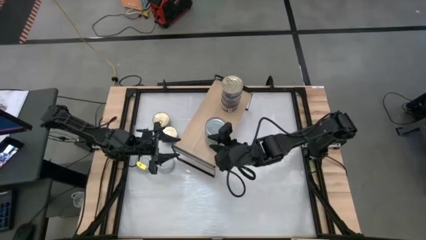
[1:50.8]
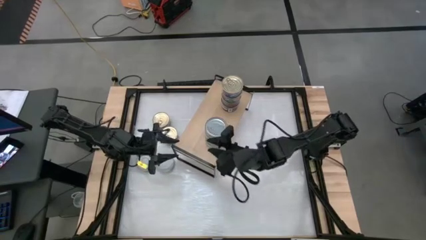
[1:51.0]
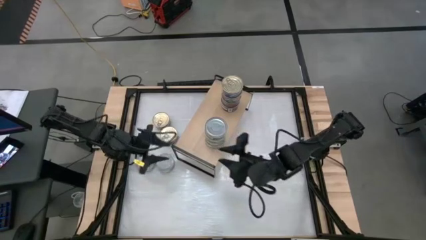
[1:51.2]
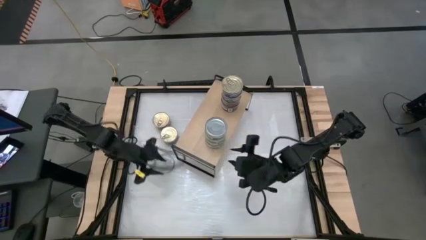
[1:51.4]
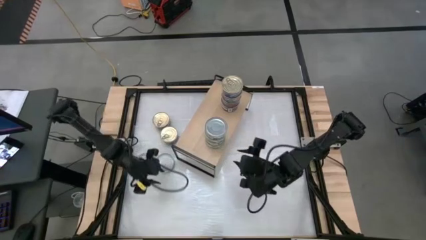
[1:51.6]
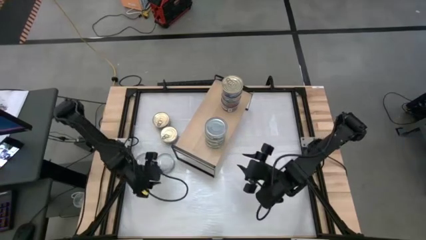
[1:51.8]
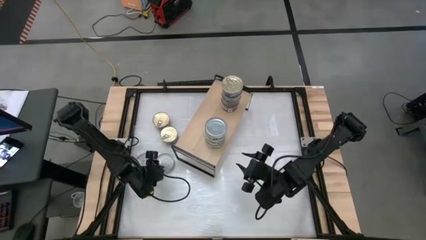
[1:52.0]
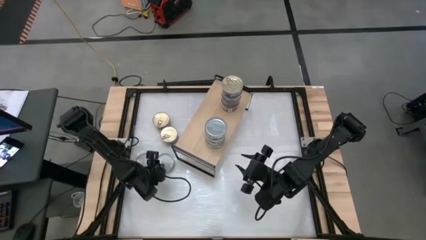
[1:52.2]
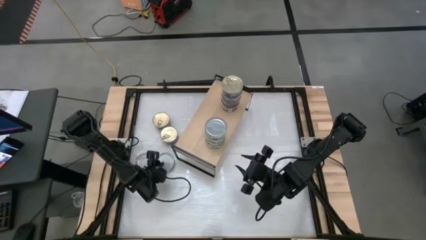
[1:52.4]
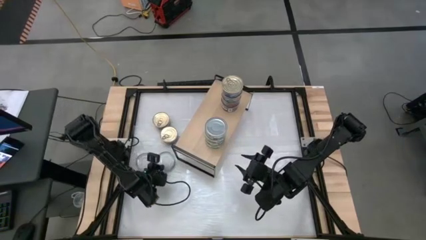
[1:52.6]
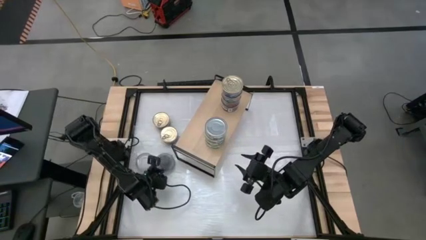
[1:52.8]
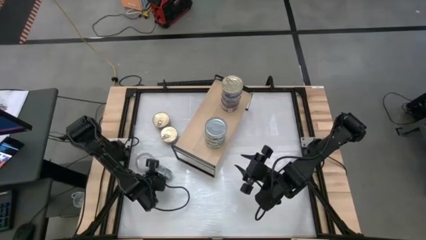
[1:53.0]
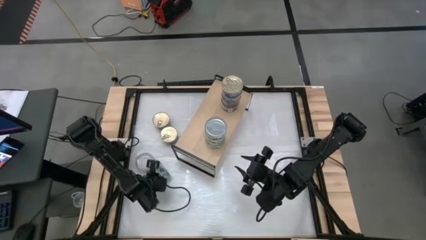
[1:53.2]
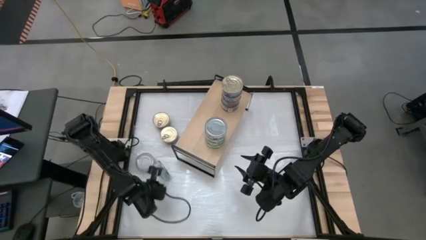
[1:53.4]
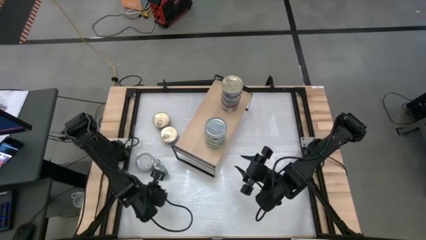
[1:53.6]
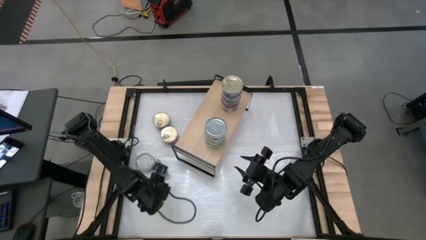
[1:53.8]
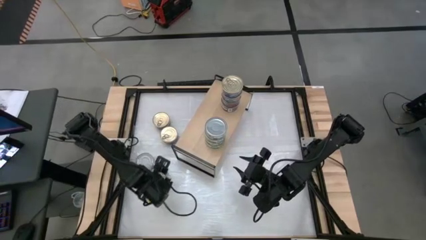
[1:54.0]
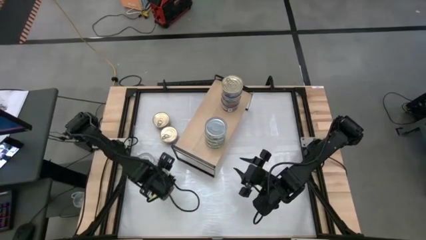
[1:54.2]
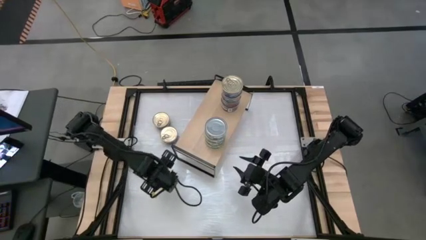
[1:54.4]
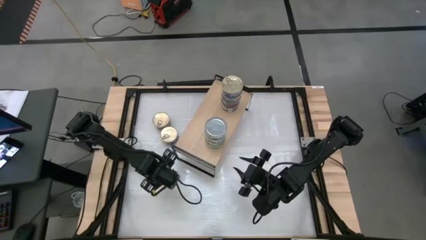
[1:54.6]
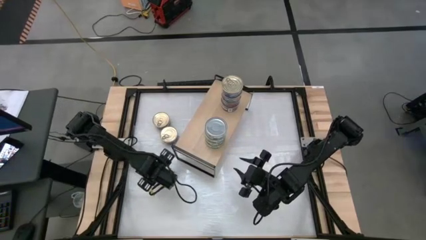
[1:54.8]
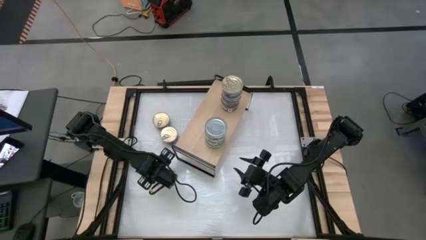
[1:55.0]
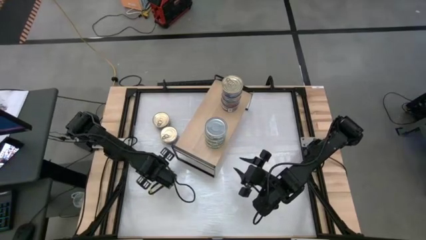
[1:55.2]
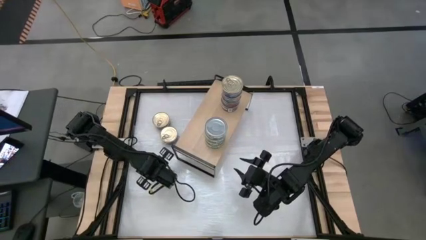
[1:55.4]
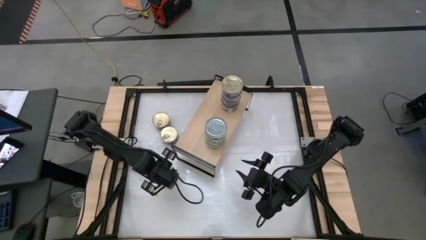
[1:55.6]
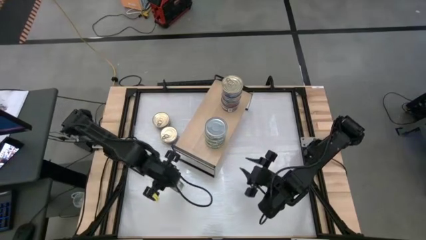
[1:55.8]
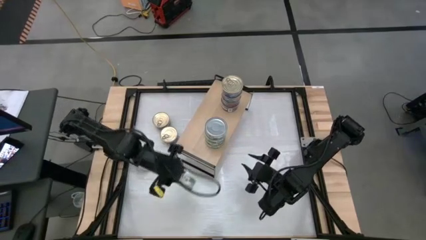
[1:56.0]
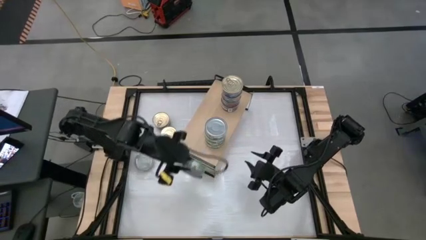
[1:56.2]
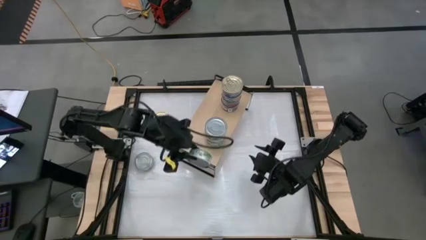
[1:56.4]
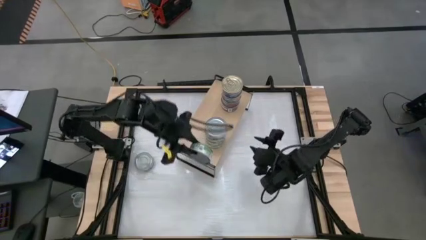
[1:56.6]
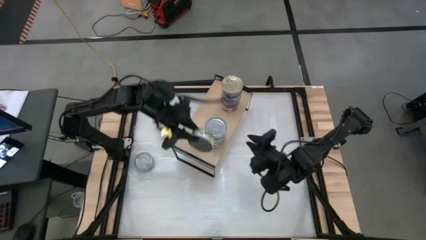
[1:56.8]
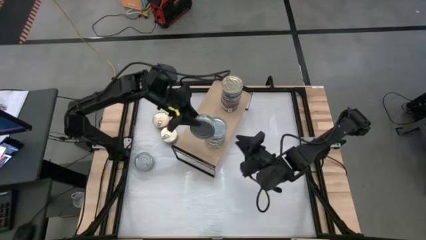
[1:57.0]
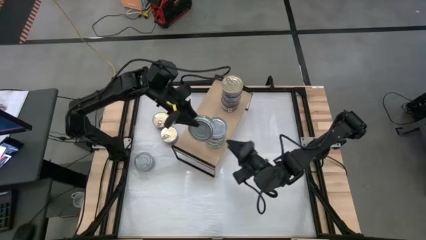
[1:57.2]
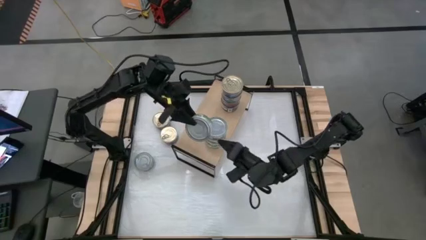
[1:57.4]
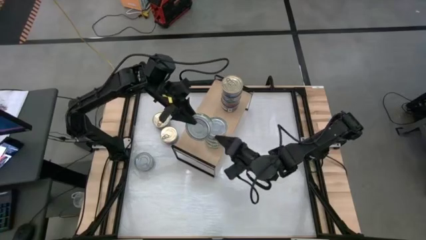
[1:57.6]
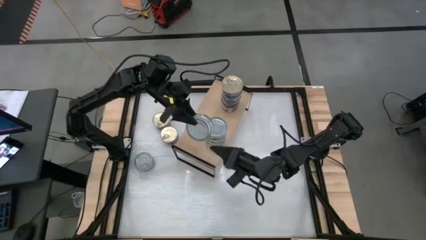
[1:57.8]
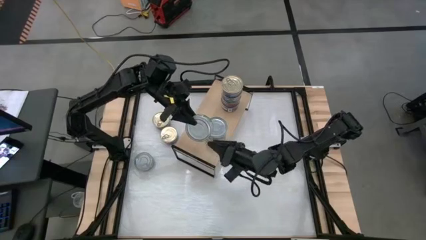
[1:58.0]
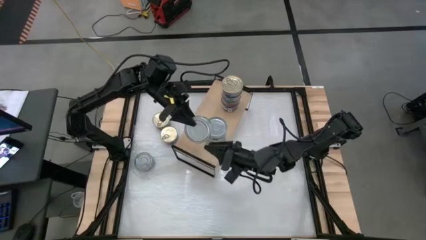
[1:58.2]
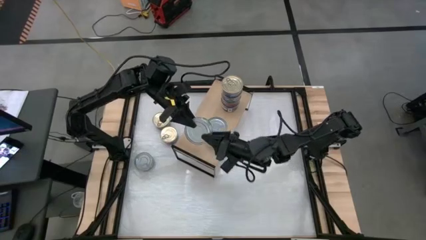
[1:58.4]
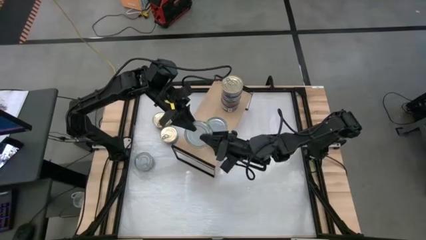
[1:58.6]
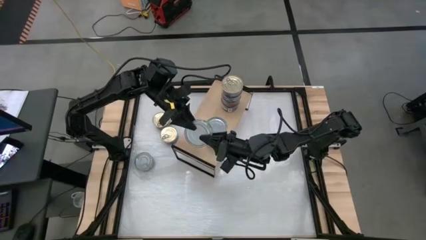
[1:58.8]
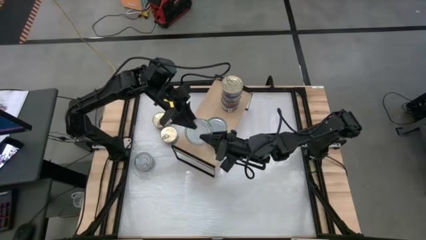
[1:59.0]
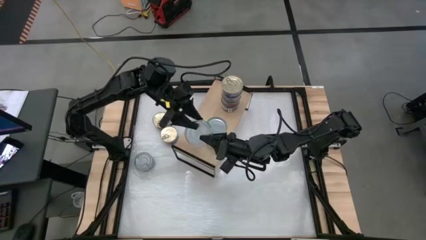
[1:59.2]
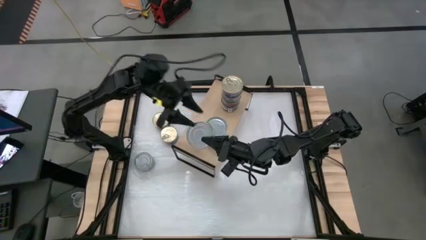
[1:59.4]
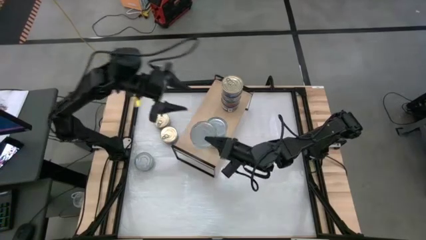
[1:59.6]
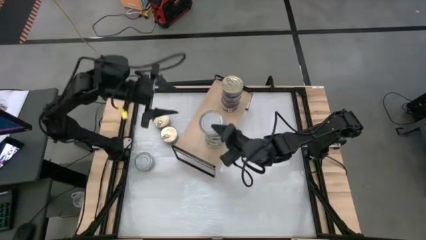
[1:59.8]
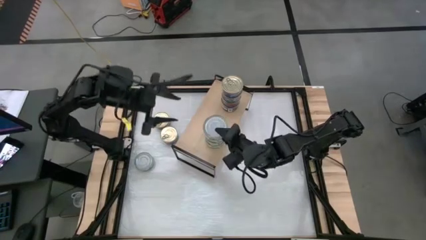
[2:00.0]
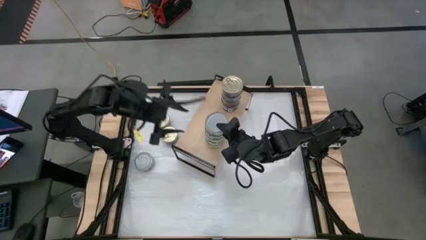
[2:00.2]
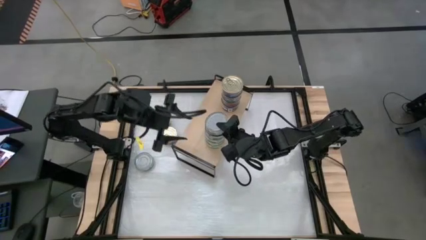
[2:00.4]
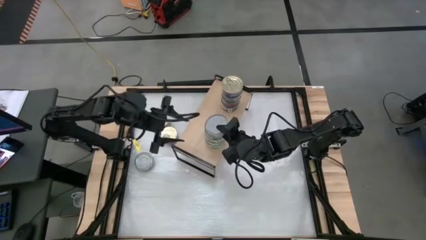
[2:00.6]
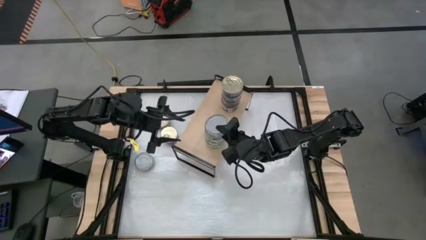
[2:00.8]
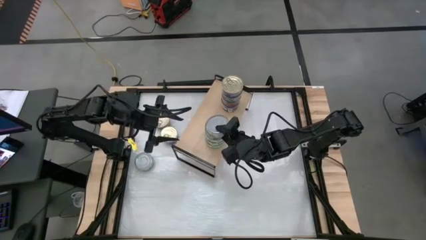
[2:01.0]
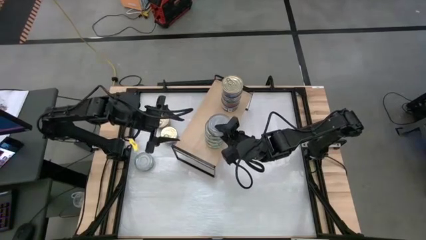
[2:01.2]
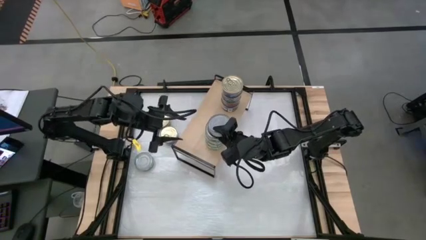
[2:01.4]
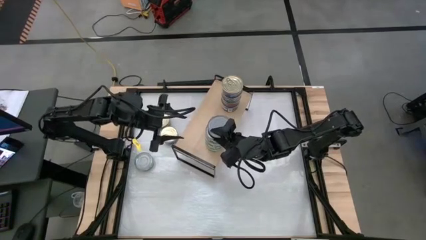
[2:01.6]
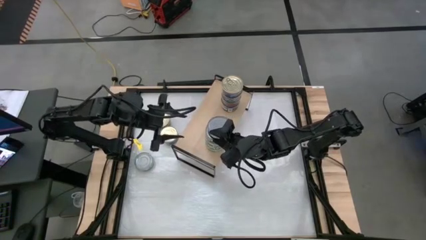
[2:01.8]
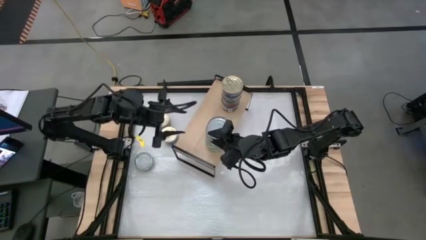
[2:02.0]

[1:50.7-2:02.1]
Task: Stack canned seafood by type on shelf
Stack the green tuna can on top of the other green tuna can
